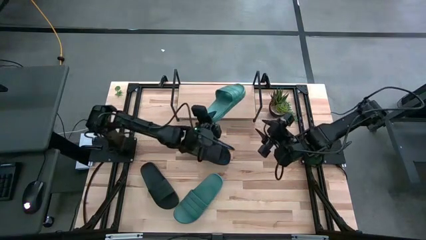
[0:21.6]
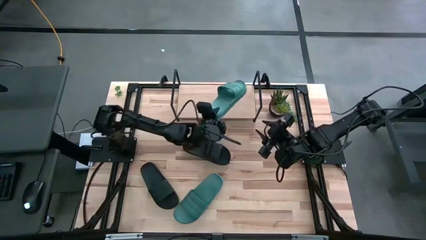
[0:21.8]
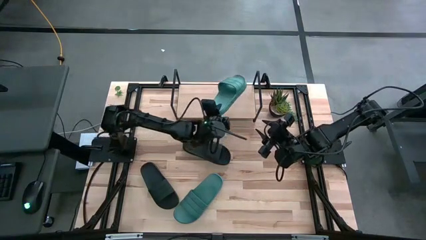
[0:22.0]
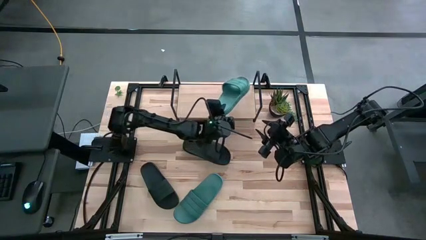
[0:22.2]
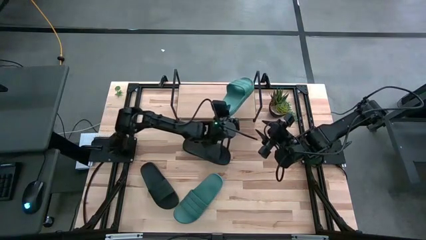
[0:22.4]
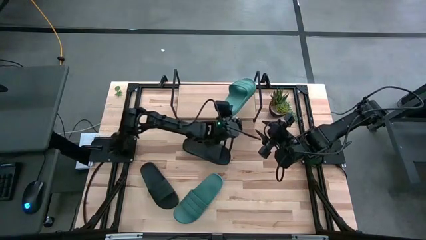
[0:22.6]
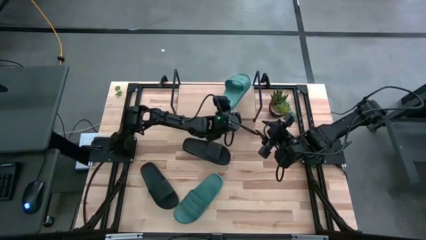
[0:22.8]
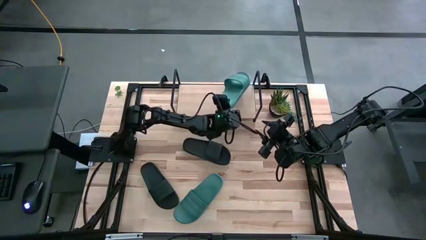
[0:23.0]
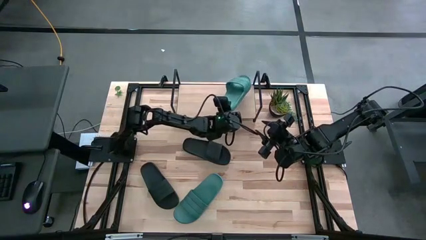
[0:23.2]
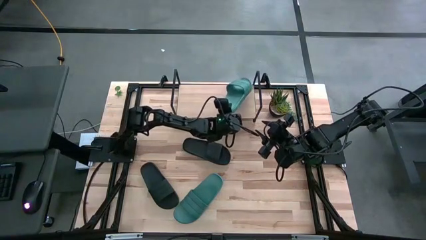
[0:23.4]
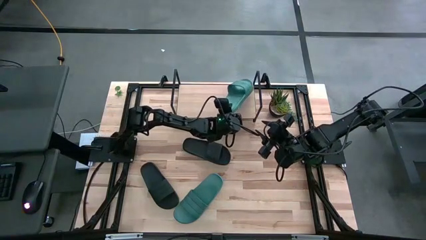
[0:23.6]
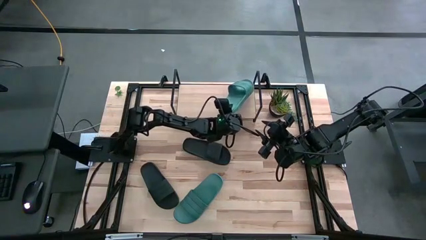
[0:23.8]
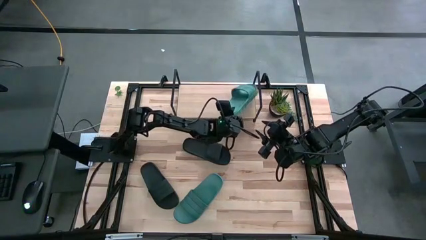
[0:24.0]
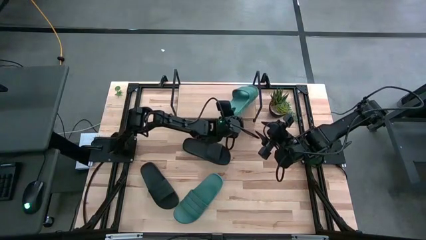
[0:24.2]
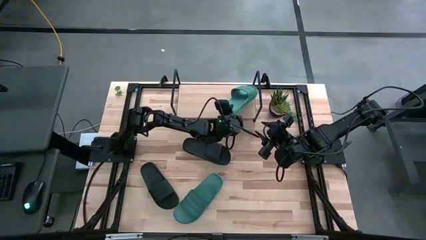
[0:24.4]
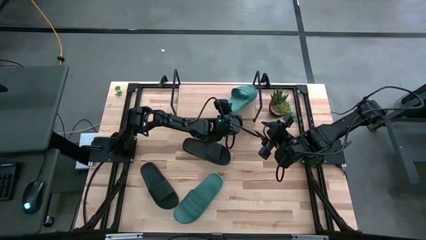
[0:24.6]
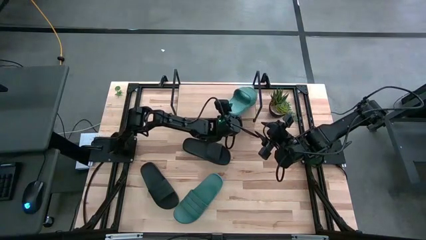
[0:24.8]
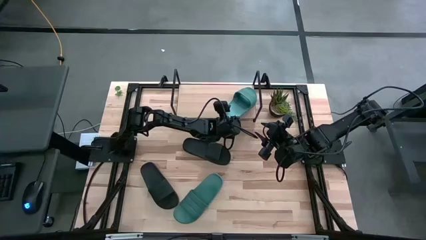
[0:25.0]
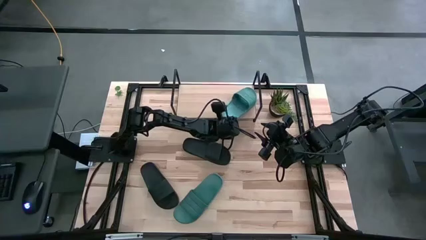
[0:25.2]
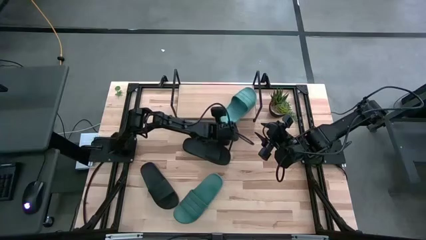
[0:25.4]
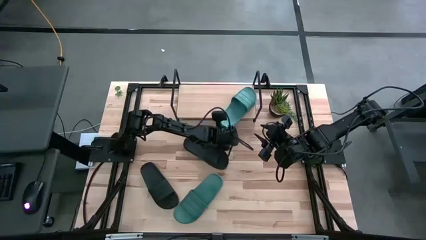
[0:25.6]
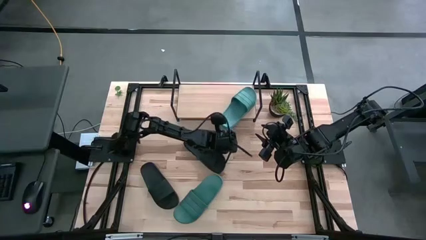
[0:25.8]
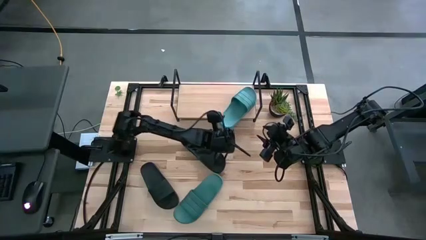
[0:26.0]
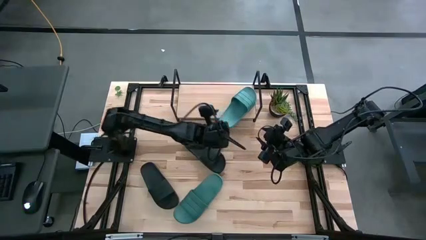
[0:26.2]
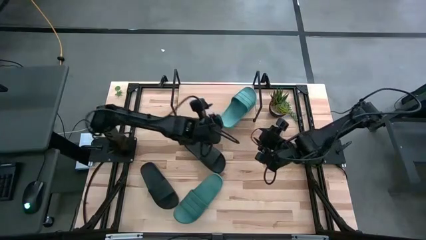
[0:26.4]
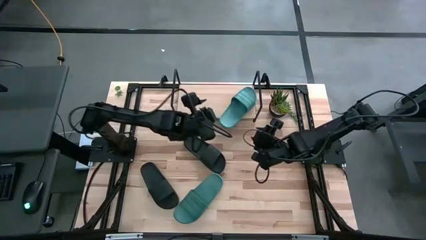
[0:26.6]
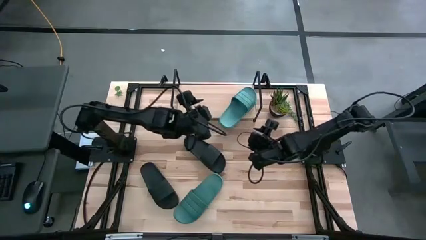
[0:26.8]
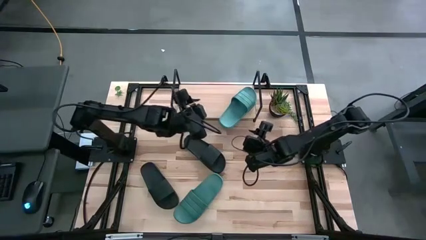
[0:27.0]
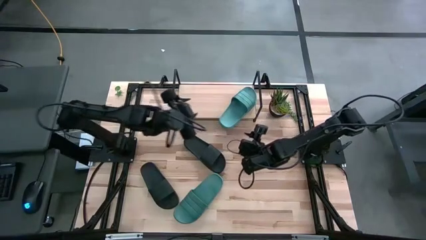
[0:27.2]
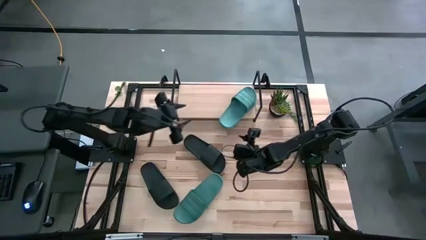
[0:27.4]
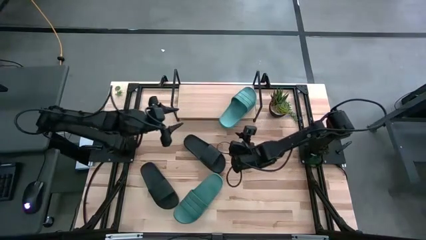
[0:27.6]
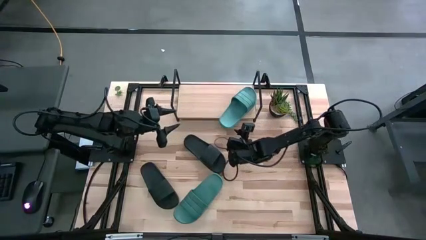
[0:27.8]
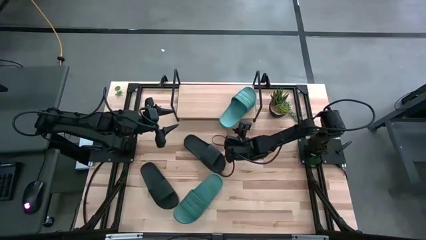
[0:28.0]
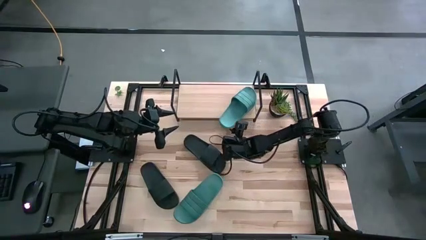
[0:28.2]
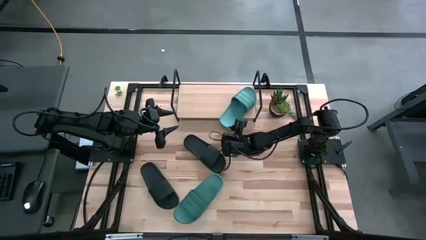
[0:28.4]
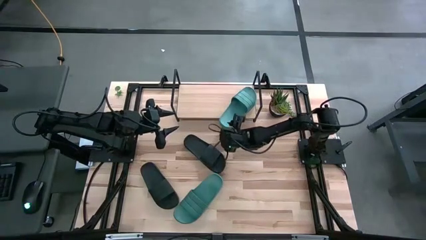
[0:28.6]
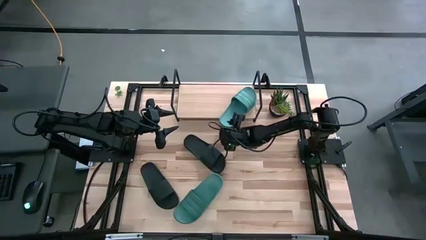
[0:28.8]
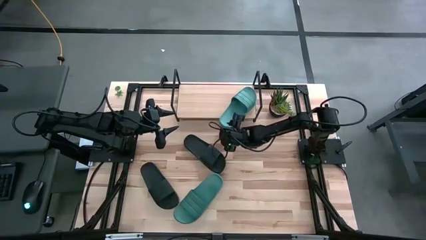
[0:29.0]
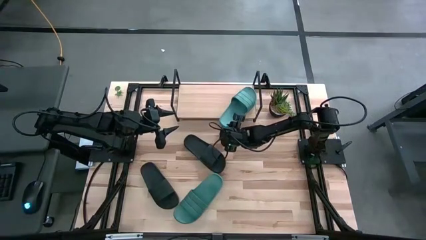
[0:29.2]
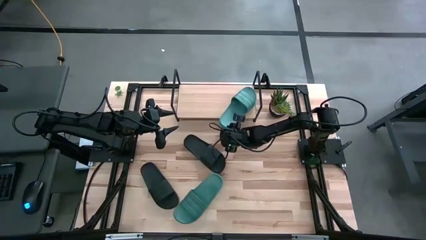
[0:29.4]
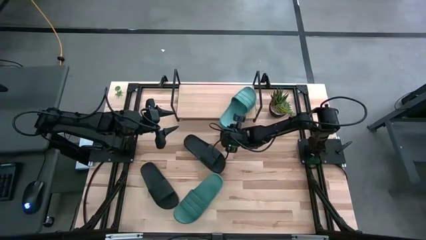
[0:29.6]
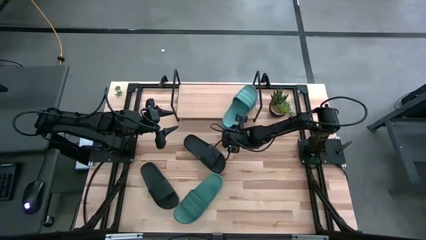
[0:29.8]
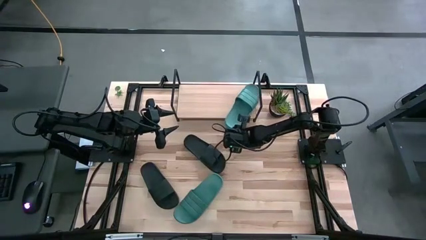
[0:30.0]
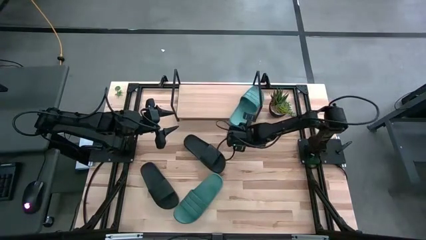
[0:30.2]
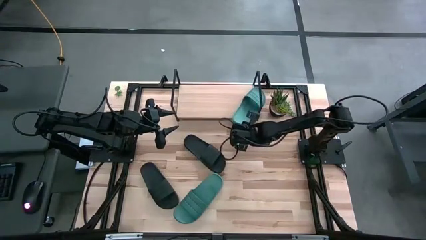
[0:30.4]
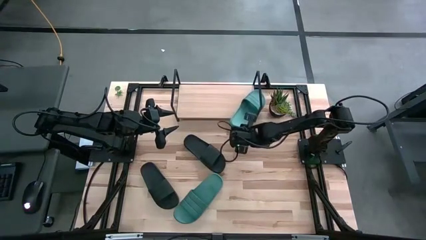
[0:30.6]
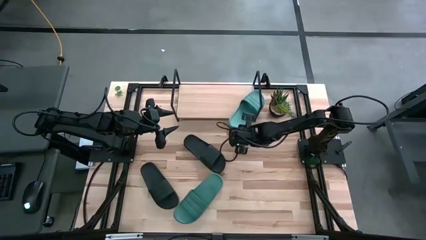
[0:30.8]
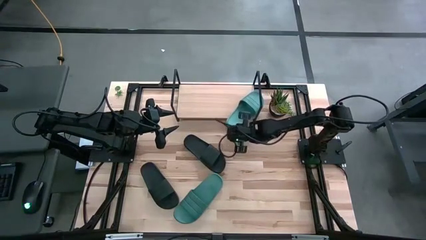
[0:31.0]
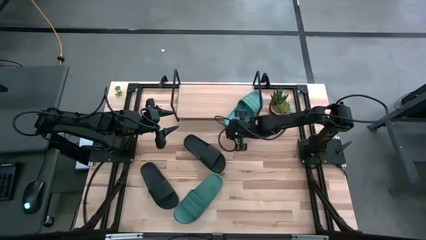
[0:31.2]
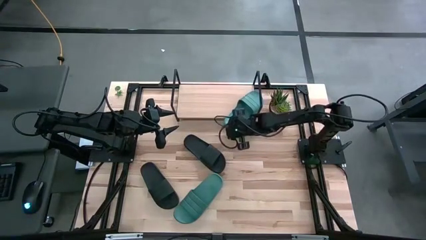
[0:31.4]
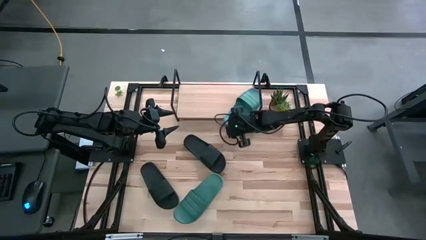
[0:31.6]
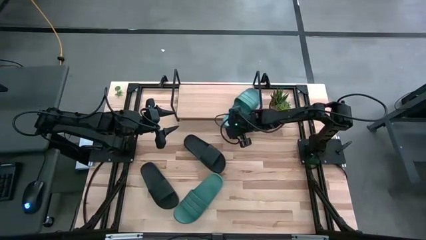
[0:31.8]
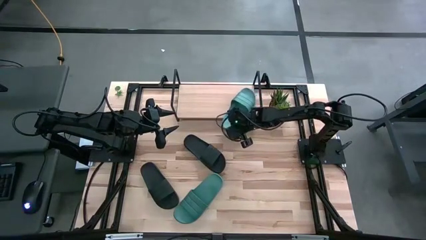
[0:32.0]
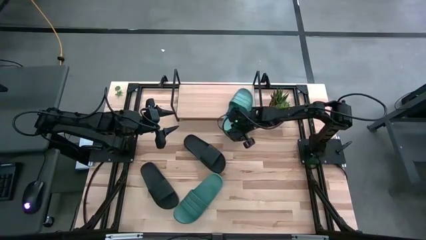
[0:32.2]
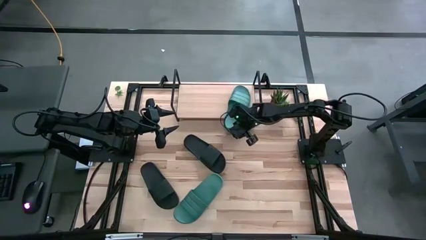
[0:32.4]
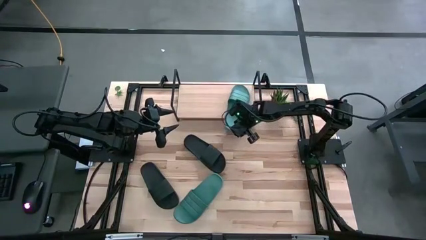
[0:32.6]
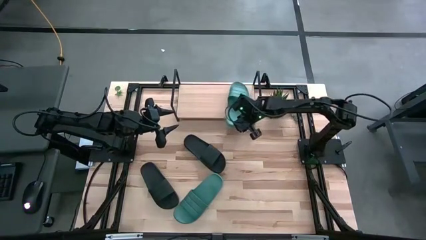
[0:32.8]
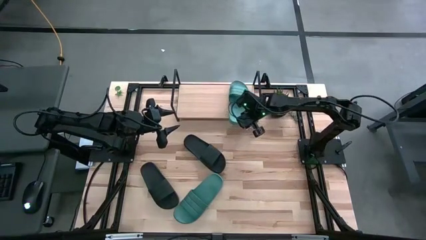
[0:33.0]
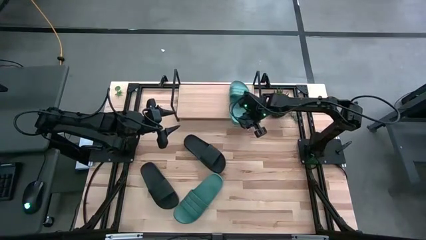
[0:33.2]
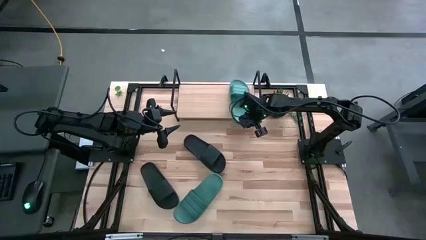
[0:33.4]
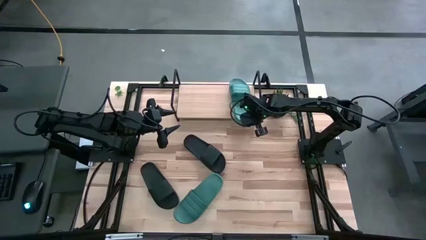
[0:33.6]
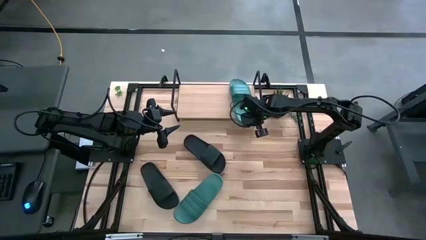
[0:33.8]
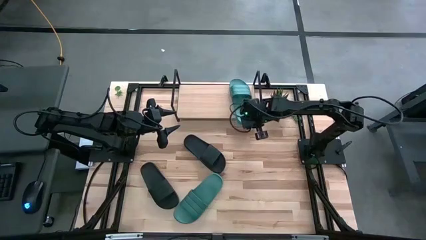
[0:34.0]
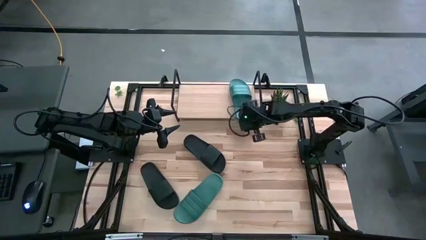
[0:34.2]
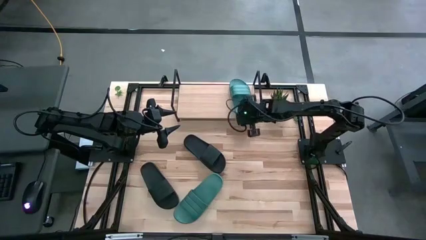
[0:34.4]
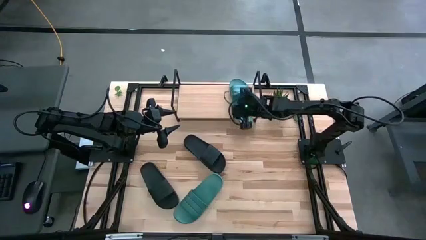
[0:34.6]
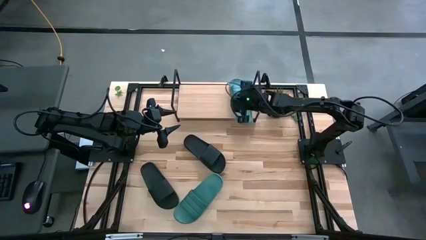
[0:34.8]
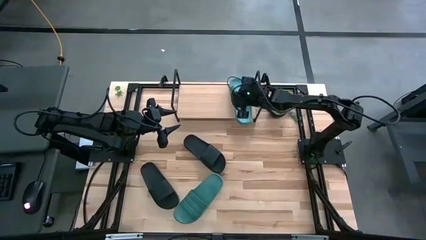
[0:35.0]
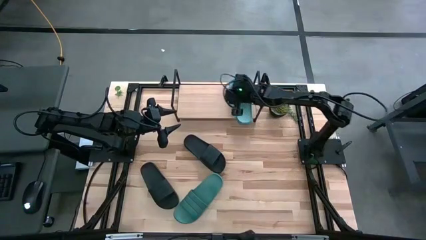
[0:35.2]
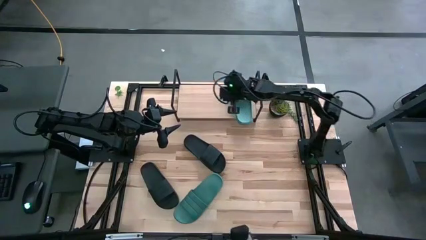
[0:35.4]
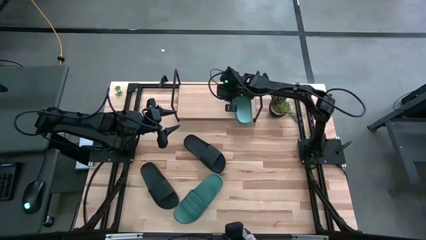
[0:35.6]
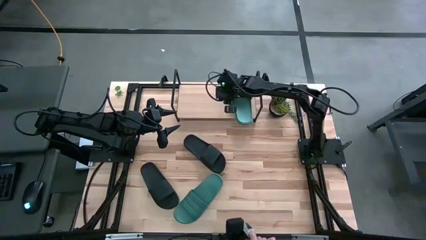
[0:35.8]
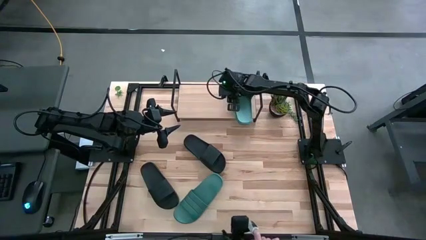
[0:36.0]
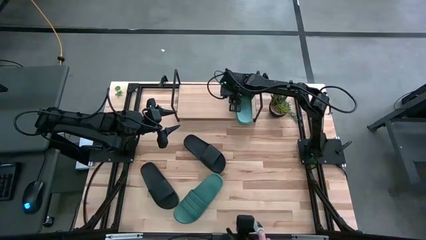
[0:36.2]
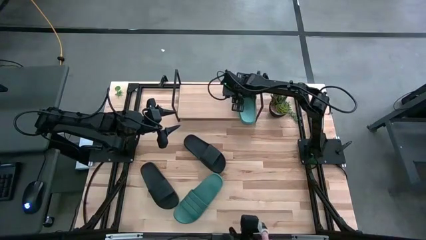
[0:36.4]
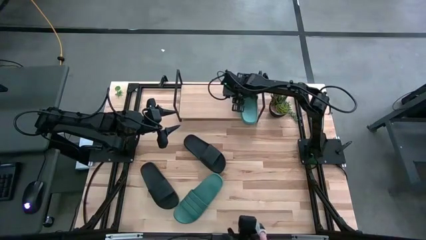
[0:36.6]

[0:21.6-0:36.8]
Task: Pick and place slides into the shelf
Put the right blue slipper on the shelf
